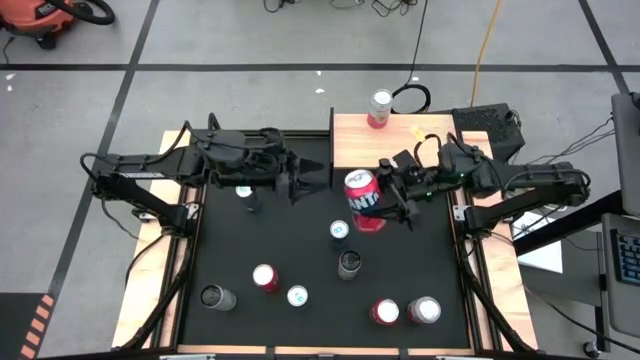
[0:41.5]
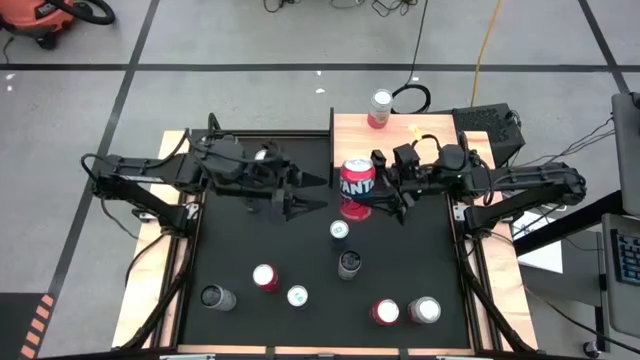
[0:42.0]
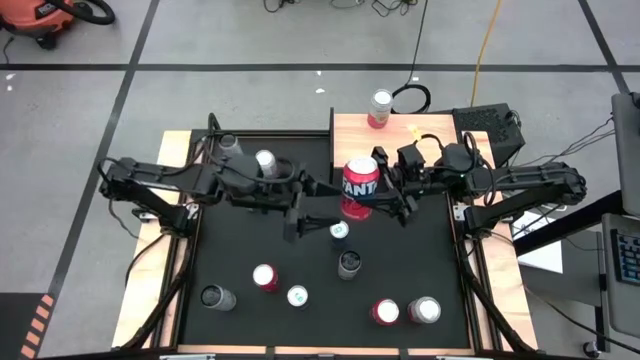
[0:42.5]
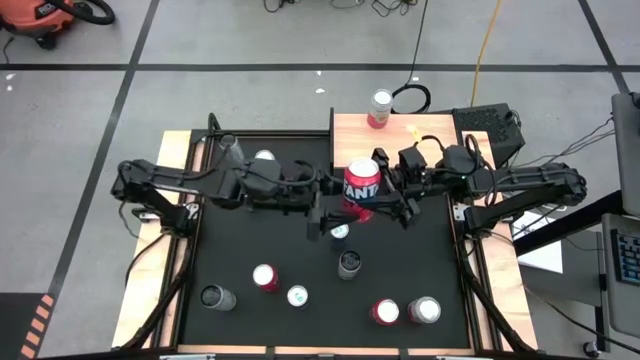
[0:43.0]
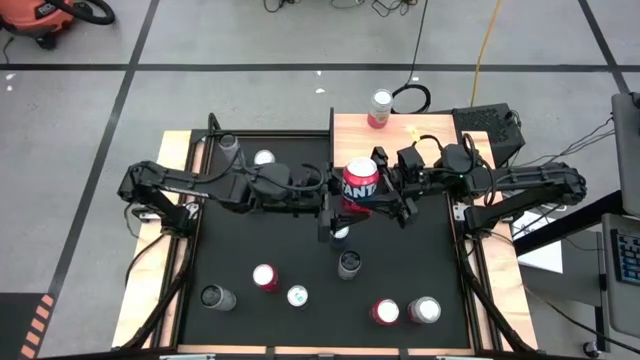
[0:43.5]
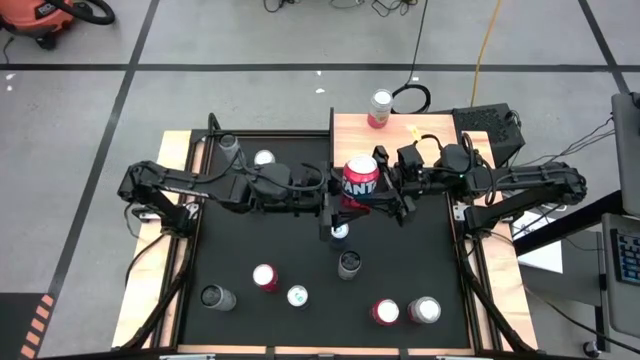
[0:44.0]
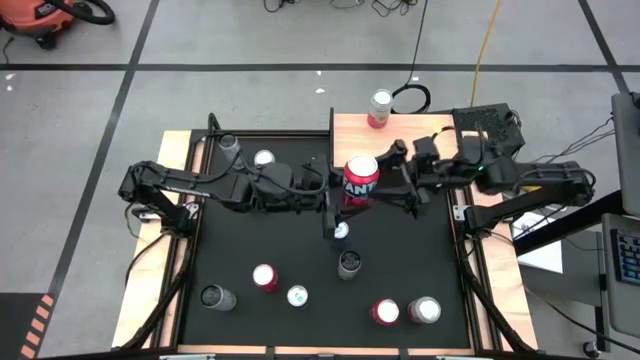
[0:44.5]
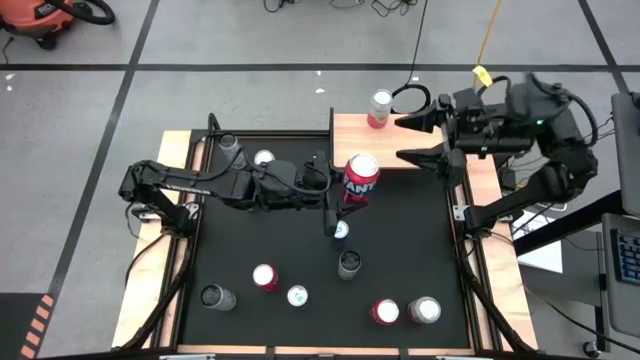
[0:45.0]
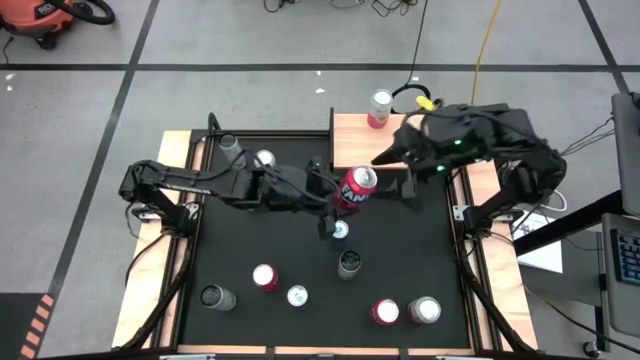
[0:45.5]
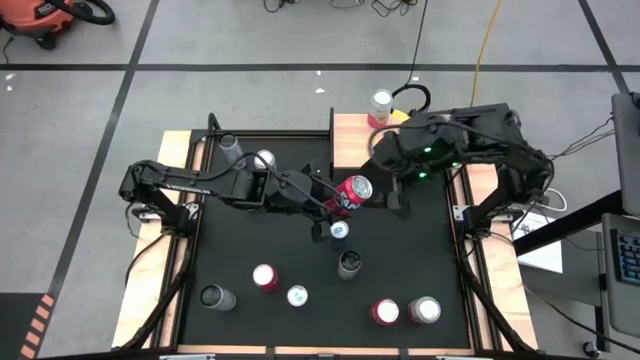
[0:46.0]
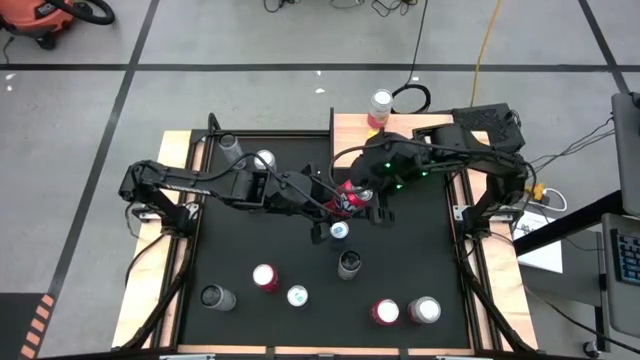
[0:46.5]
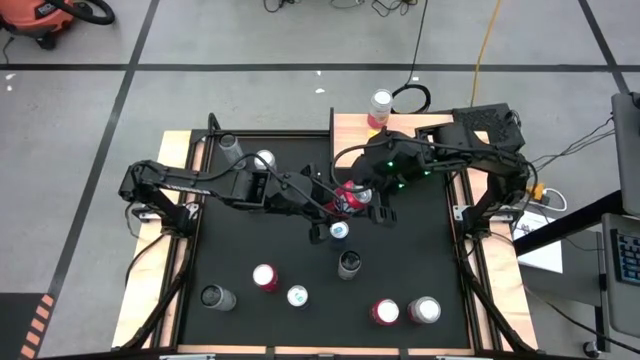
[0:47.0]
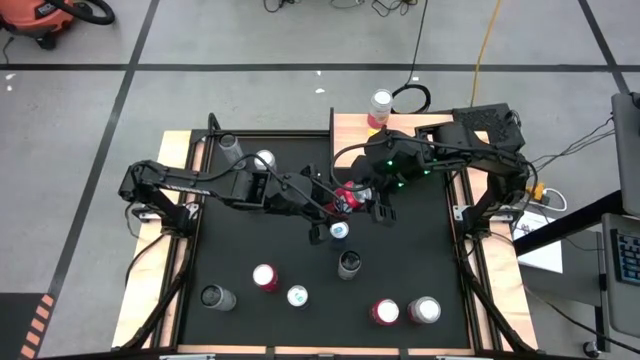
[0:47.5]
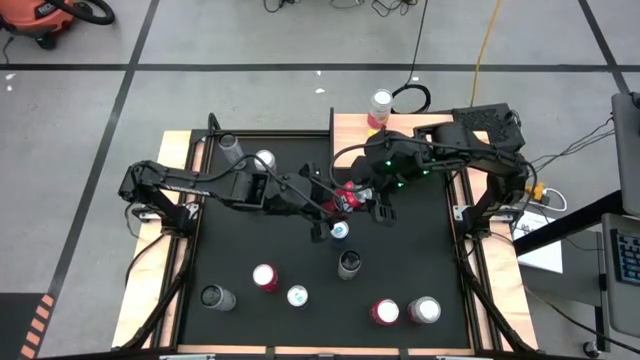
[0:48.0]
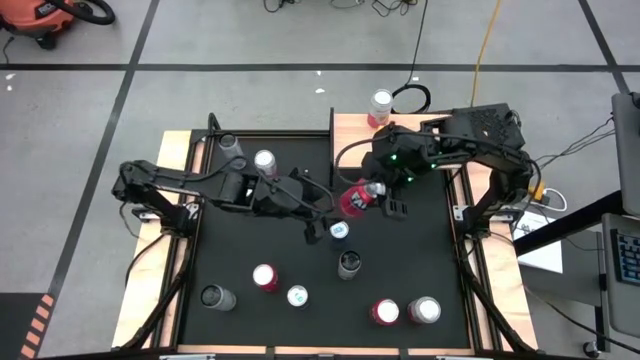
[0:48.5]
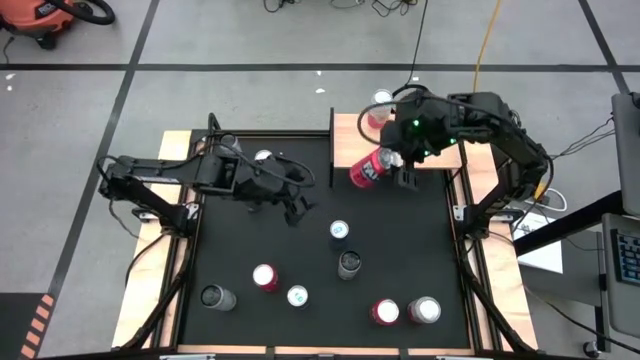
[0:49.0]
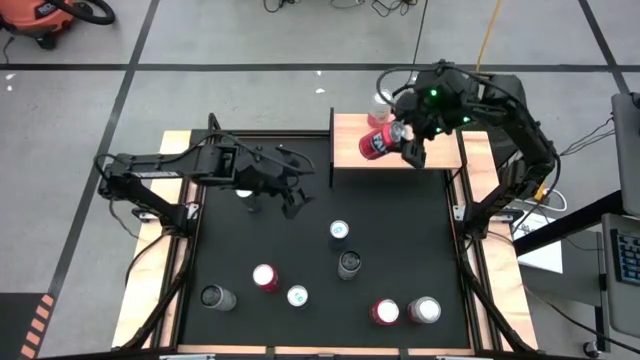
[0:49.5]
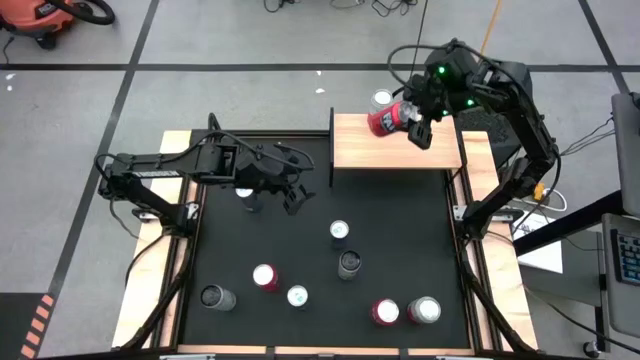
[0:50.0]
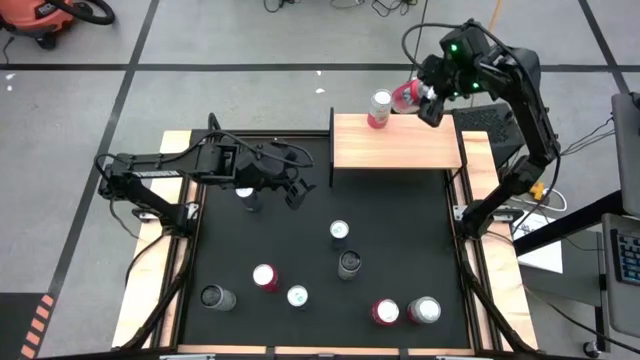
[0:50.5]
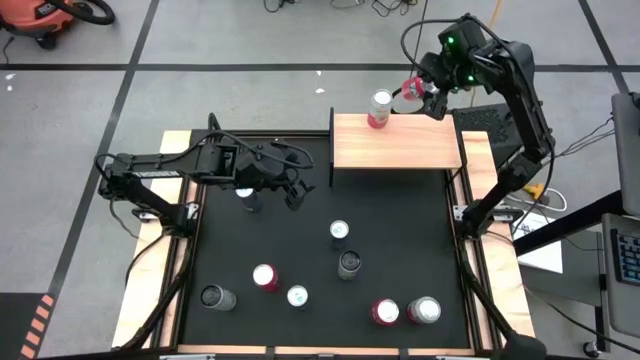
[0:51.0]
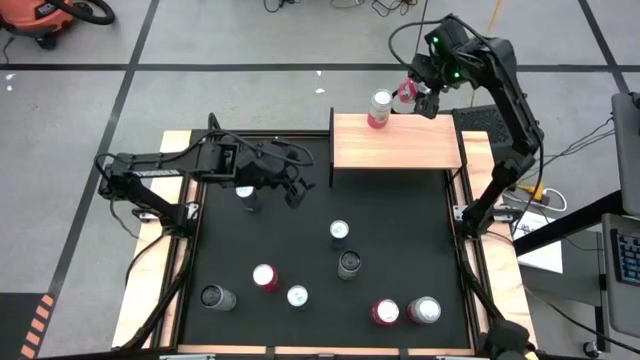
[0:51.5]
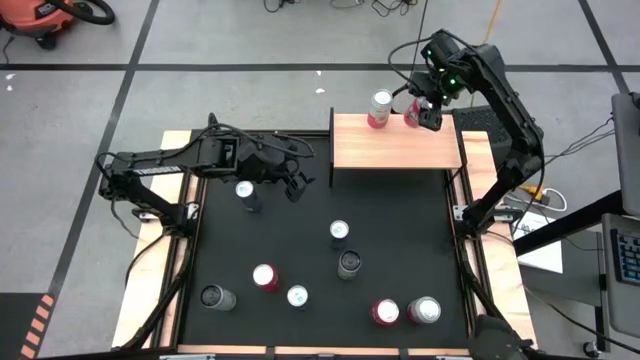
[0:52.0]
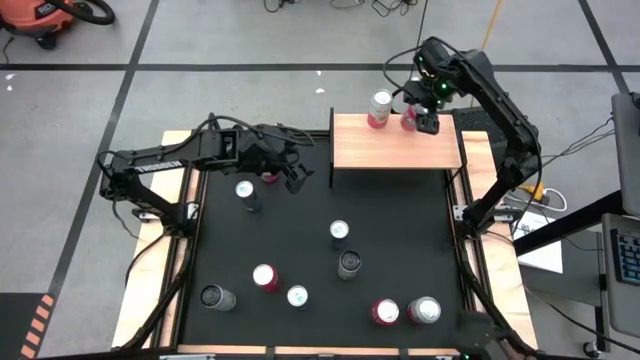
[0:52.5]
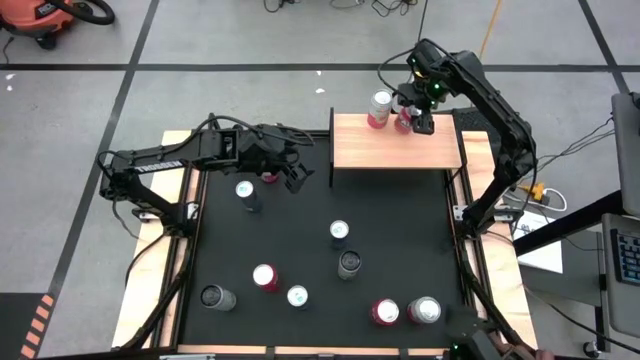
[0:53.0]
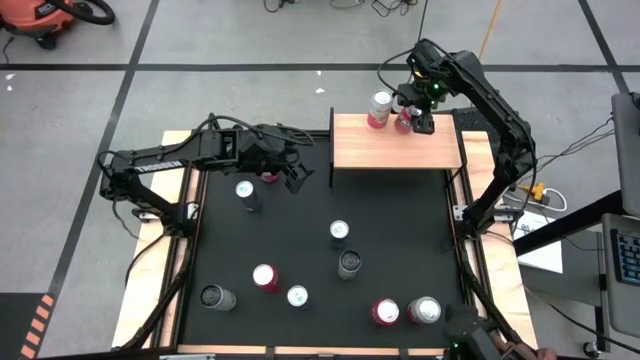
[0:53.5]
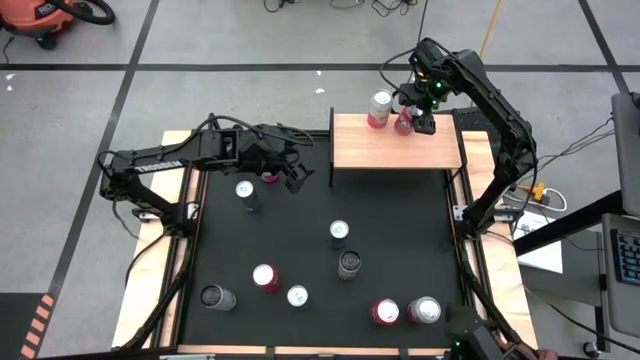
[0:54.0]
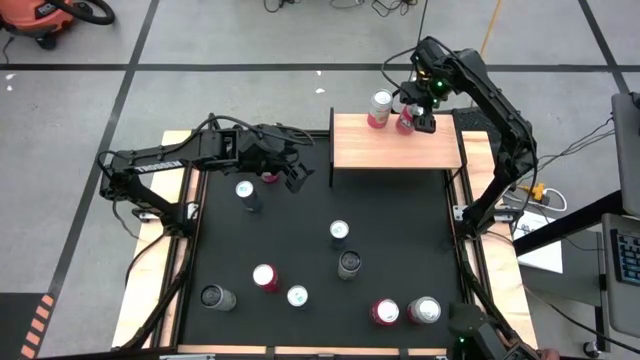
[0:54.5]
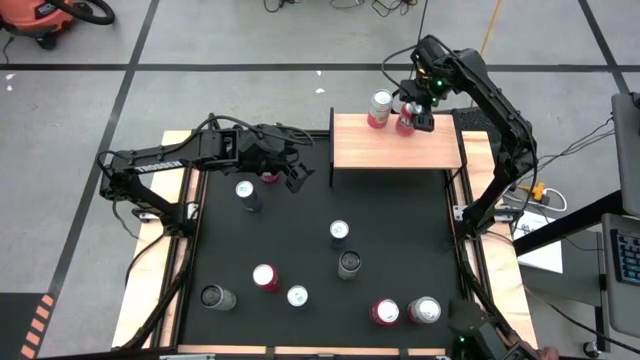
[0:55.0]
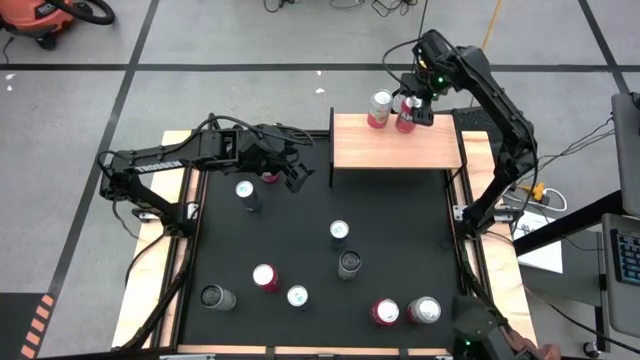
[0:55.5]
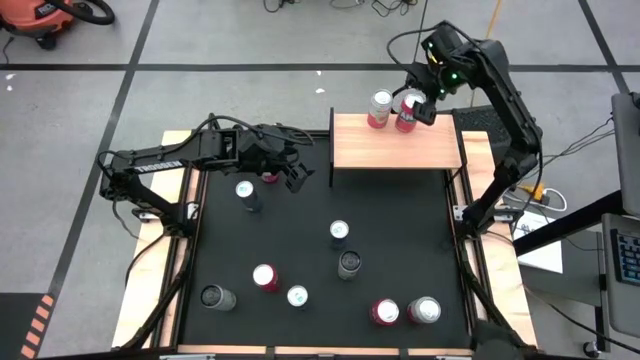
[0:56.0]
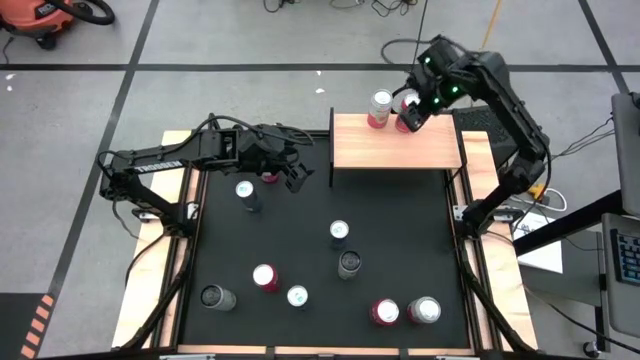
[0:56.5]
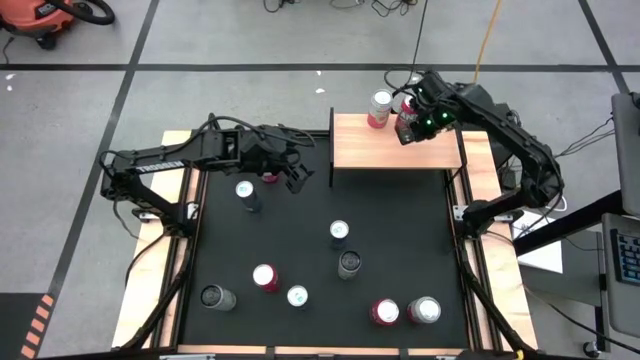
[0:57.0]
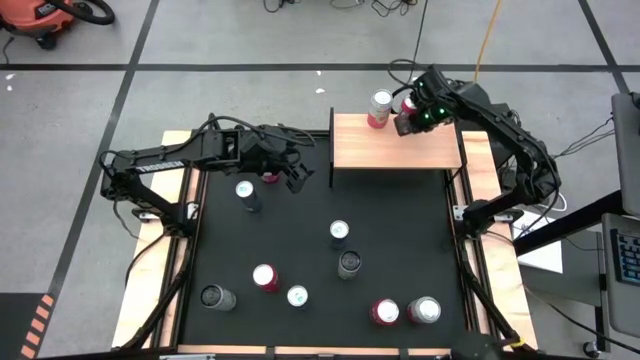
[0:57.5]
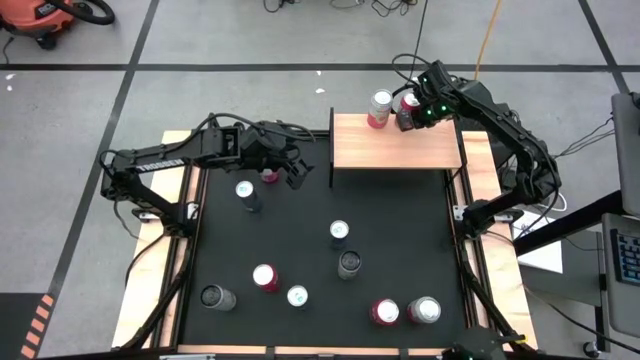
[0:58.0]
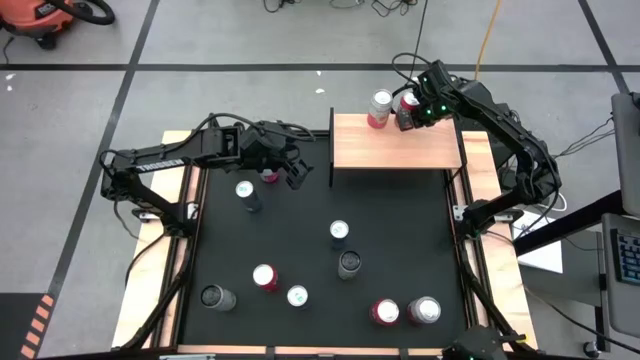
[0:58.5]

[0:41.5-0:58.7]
Task: Place canned beverage on shelf
Put the top red soda can on the shelf

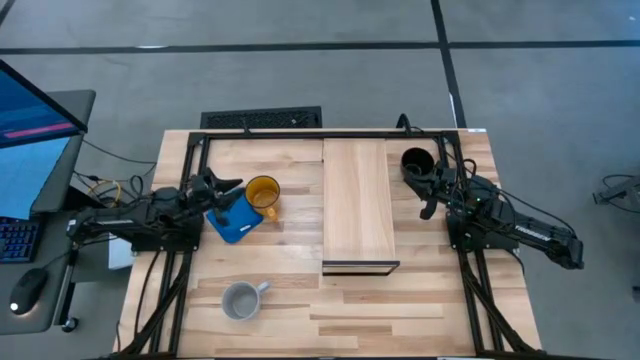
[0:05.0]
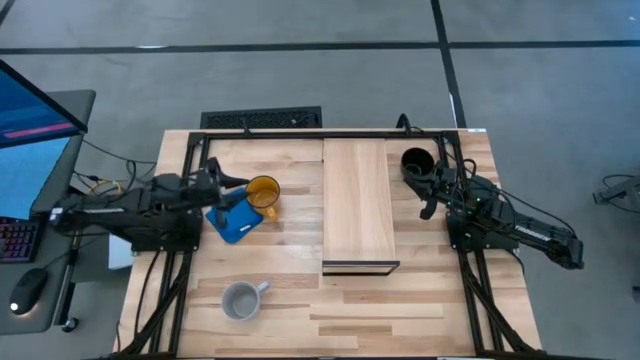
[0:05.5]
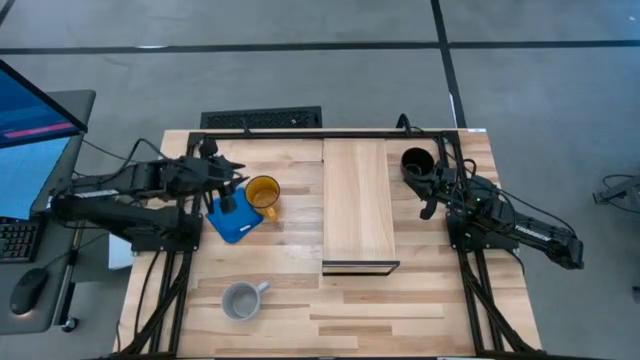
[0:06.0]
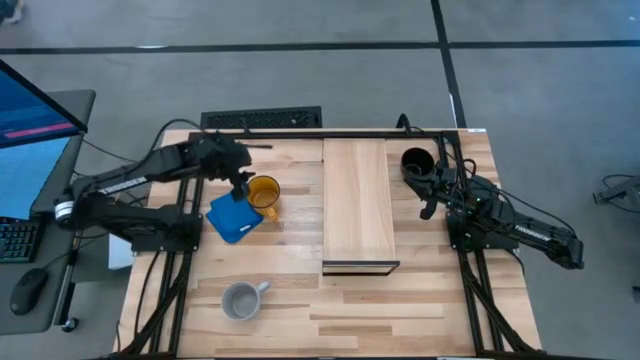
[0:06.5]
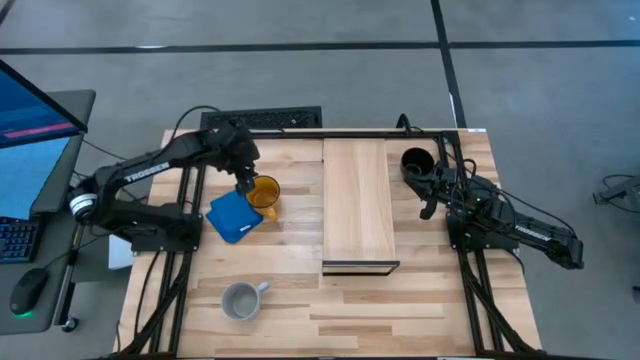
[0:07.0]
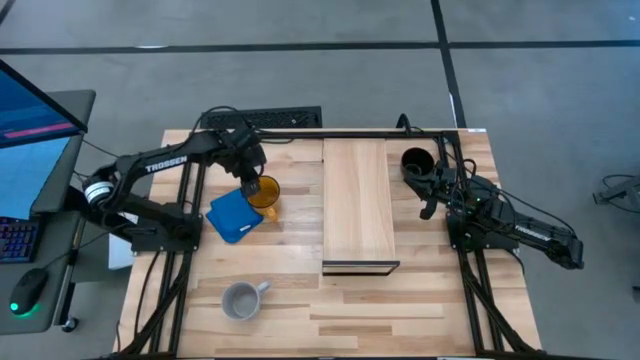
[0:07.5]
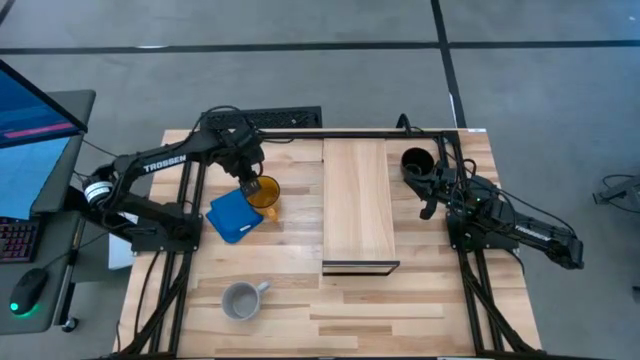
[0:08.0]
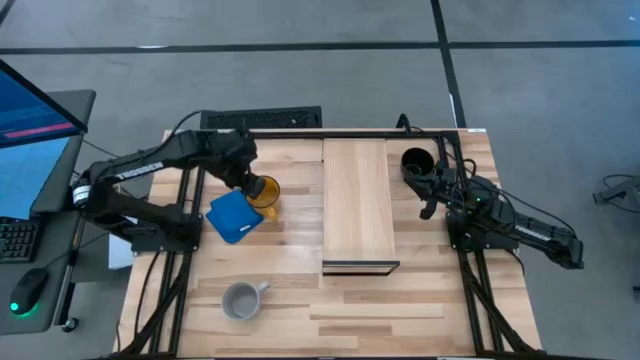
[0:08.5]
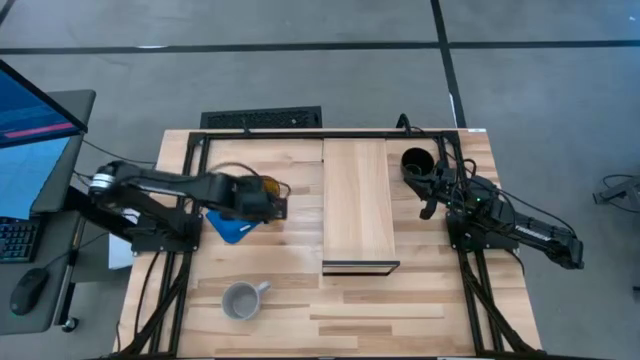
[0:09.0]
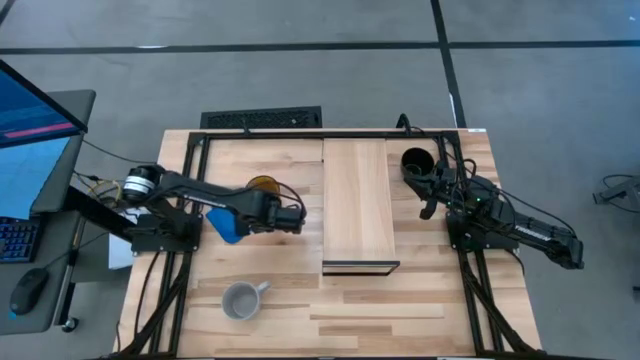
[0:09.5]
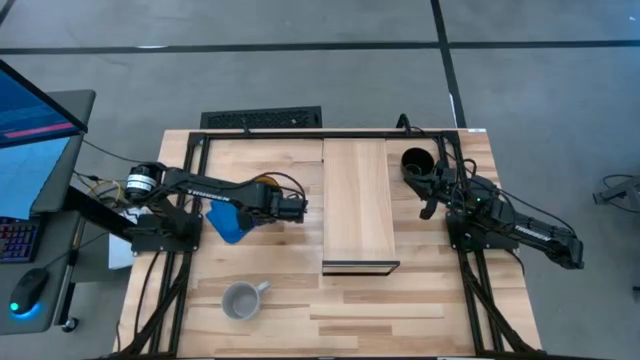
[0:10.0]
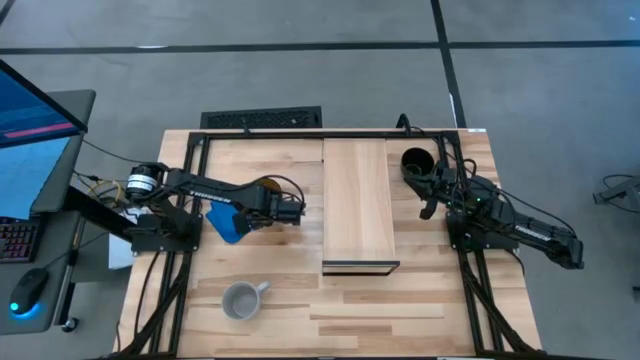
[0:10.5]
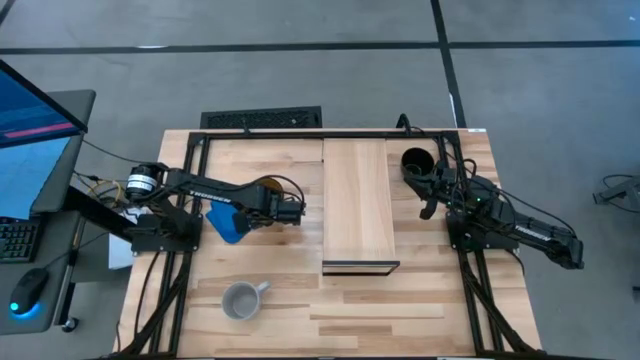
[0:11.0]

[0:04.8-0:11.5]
Task: Stack small to large cups/mugs on shelf
Put the yellow mug on the shelf
